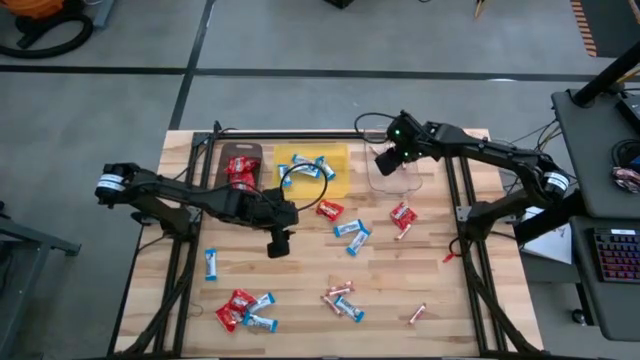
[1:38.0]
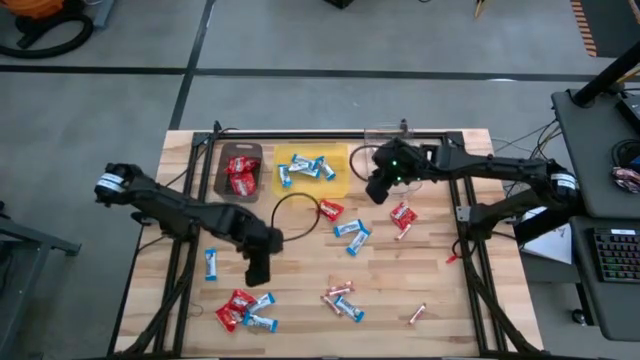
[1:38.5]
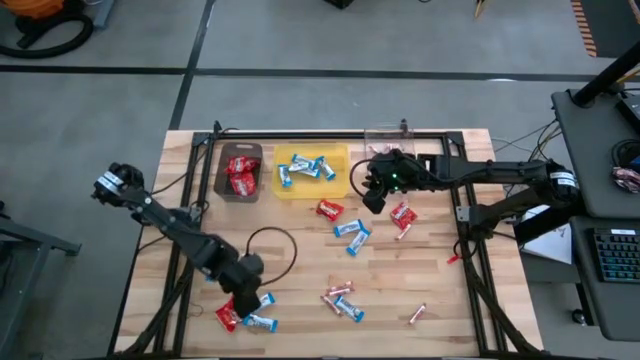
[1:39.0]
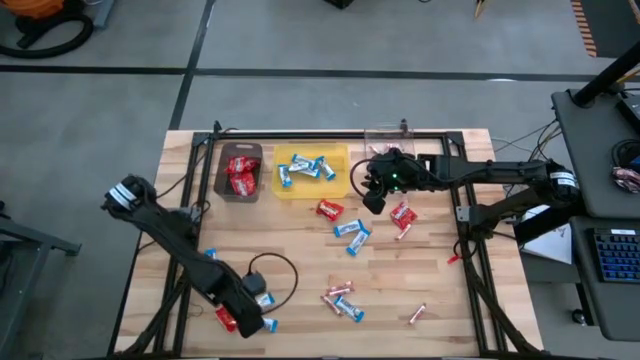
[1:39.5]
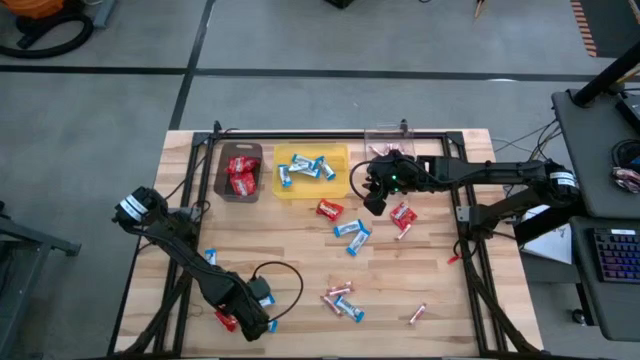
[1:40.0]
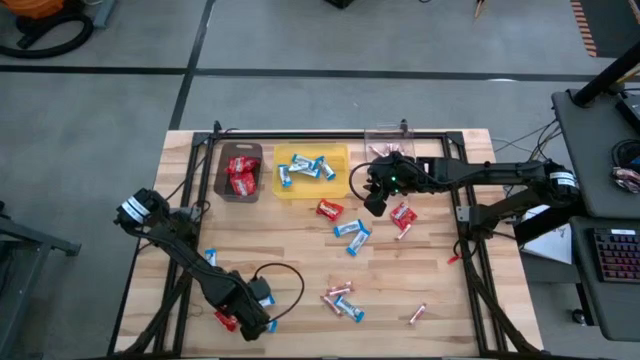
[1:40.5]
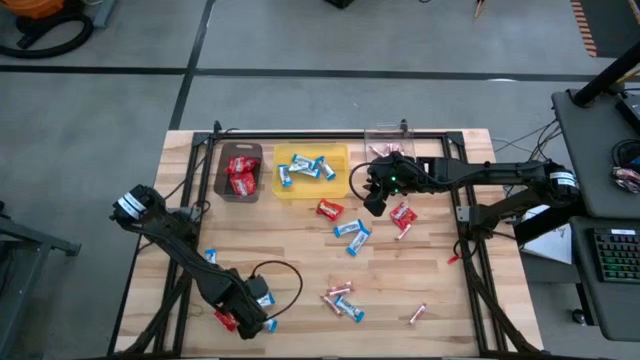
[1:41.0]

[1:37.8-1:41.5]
Task: Sort candy
Put the red candy into the black bin

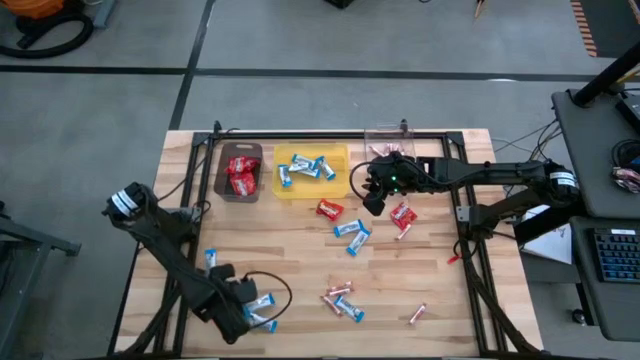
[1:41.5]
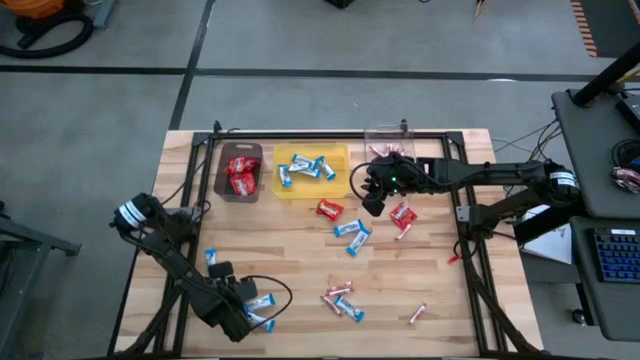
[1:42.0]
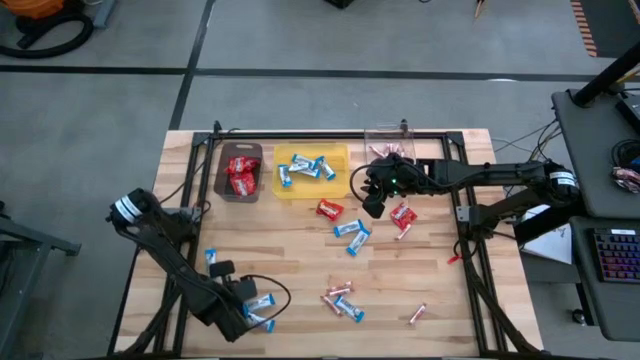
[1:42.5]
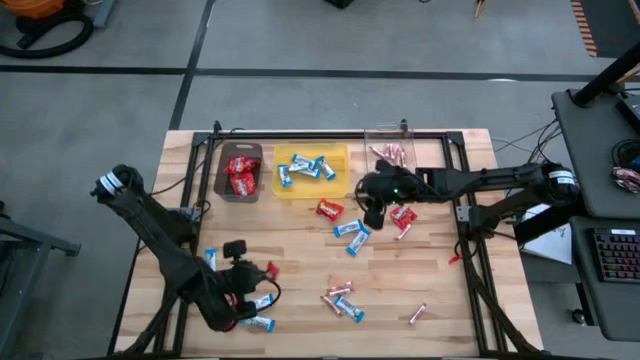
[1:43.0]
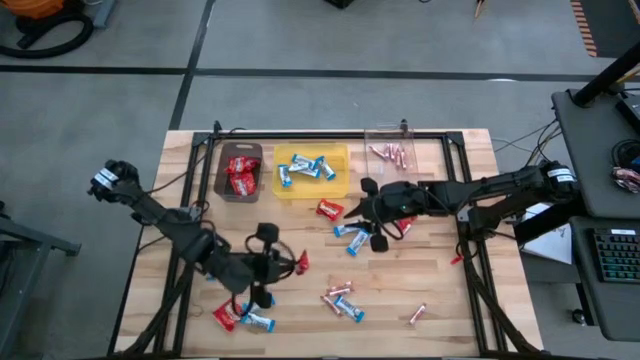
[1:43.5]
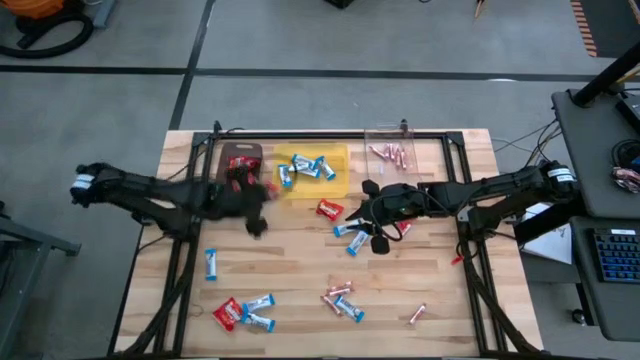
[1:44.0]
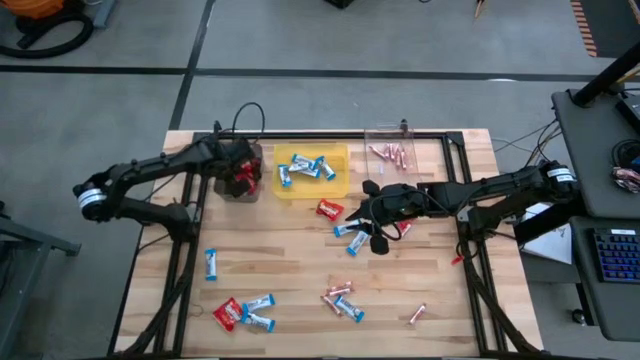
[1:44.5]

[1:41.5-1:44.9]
Put the red candy into the black bin

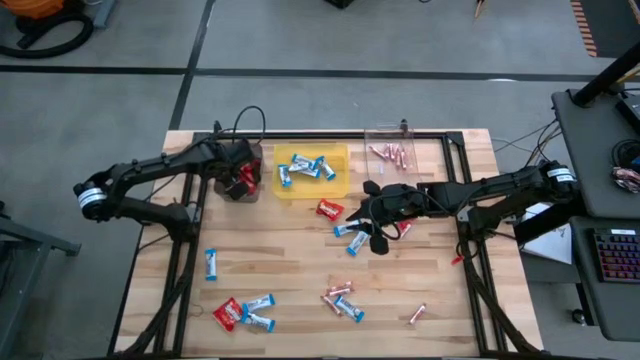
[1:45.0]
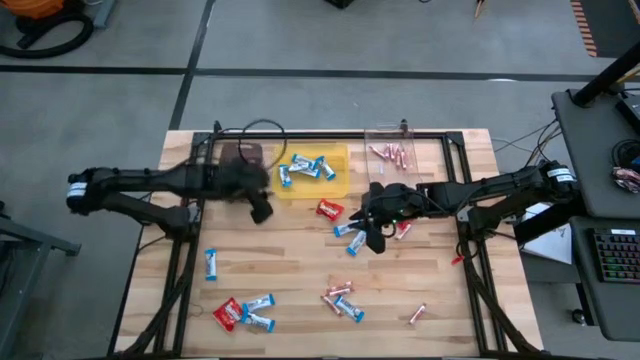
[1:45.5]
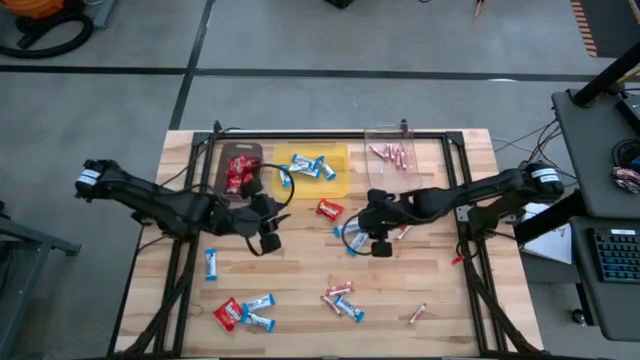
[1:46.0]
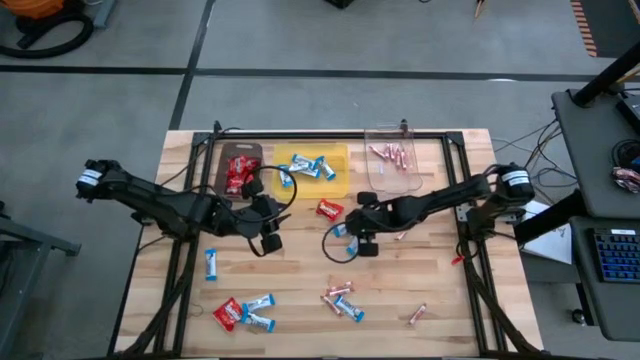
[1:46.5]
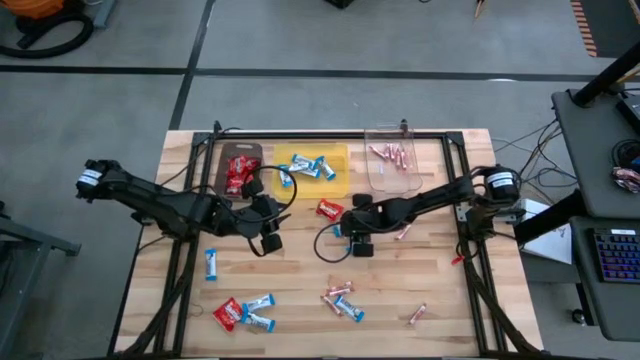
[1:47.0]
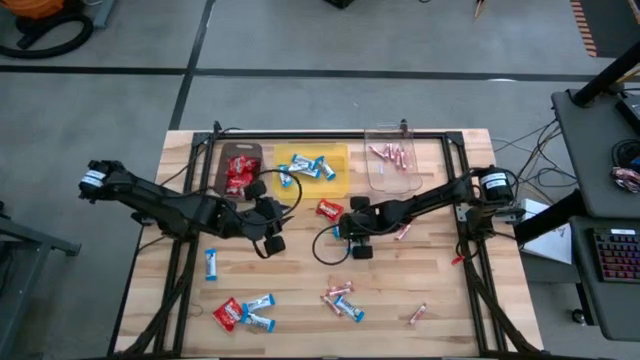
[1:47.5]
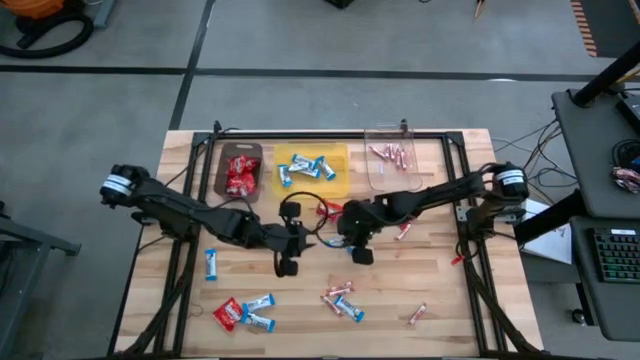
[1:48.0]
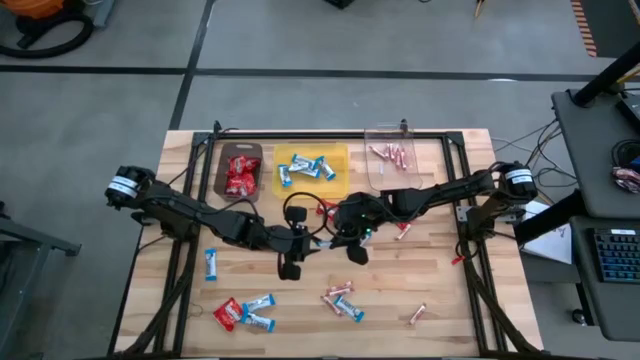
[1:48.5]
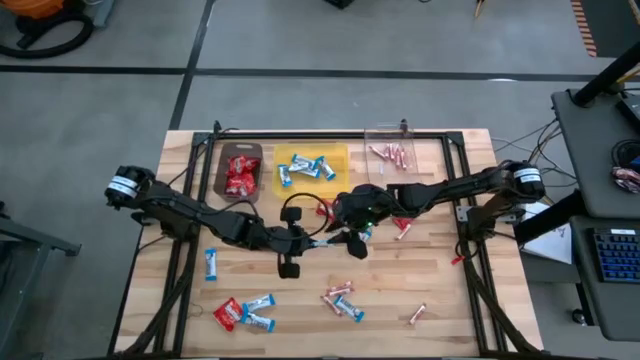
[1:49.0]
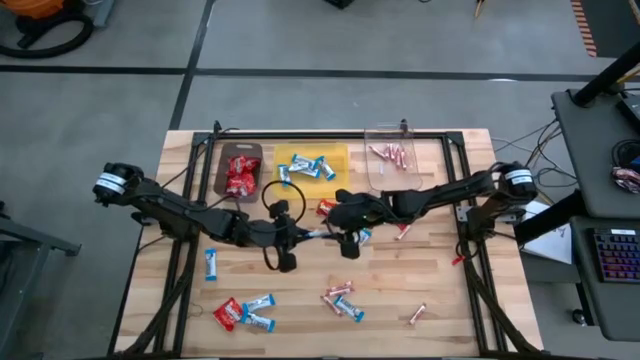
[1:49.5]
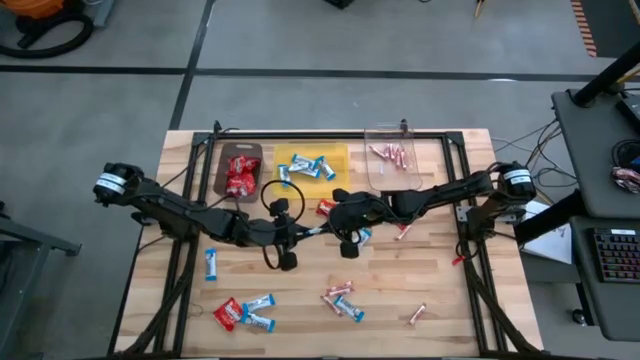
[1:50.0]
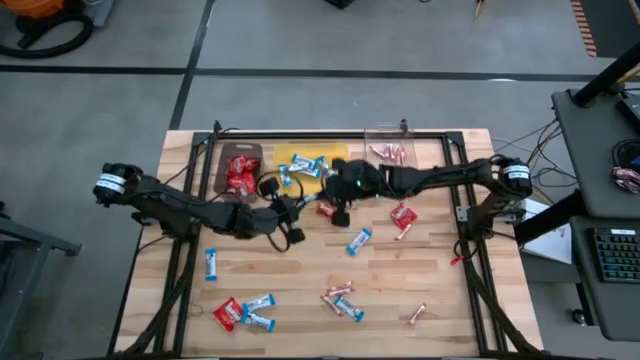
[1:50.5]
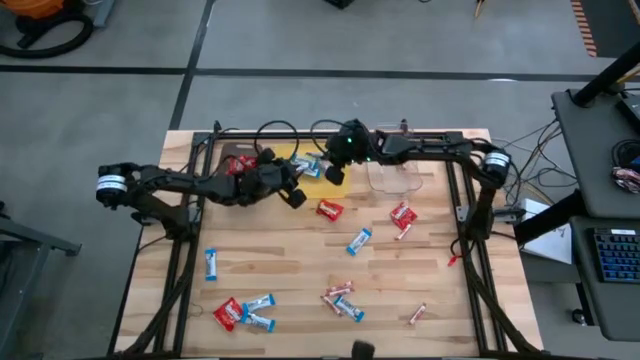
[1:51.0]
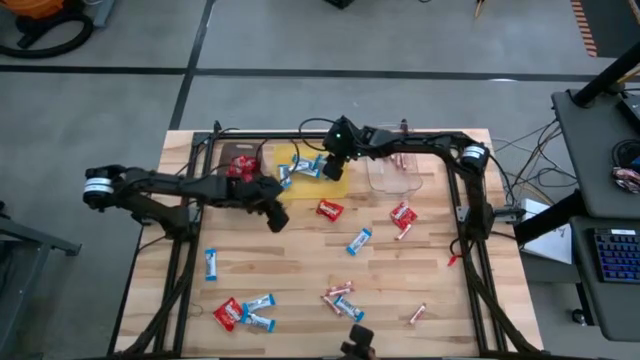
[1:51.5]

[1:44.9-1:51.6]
Put the white candy into the yellow bin

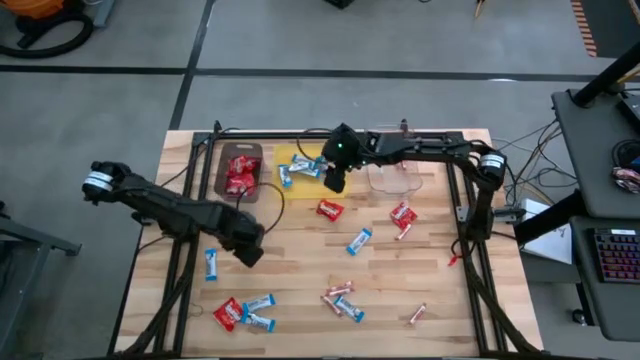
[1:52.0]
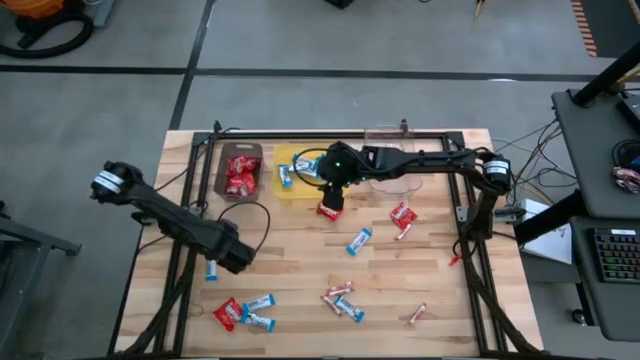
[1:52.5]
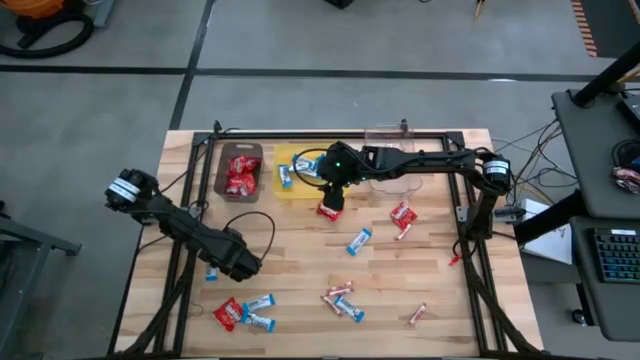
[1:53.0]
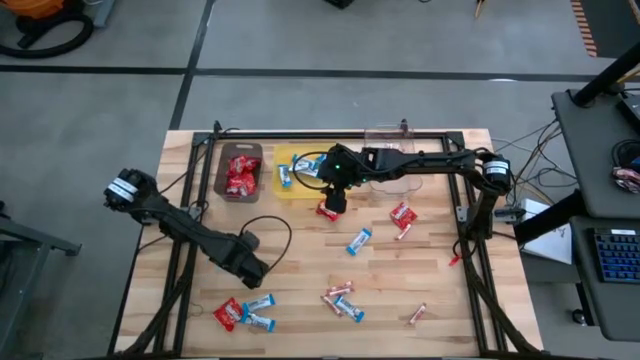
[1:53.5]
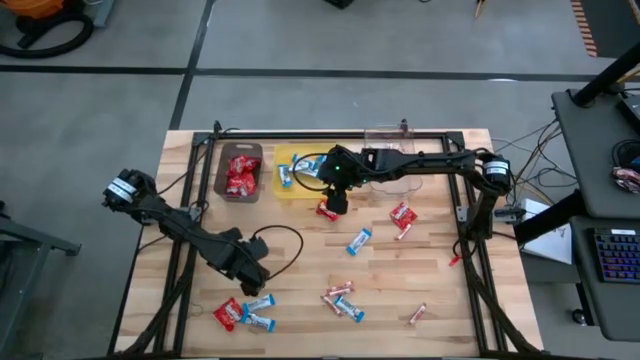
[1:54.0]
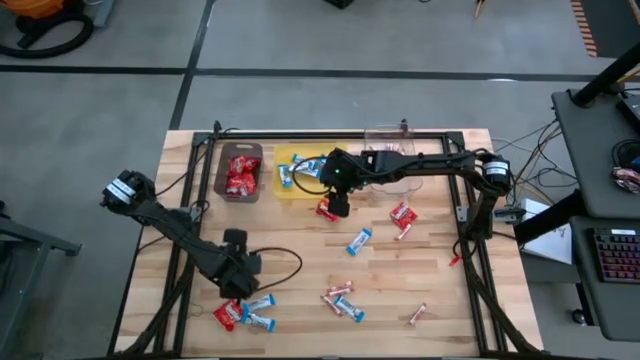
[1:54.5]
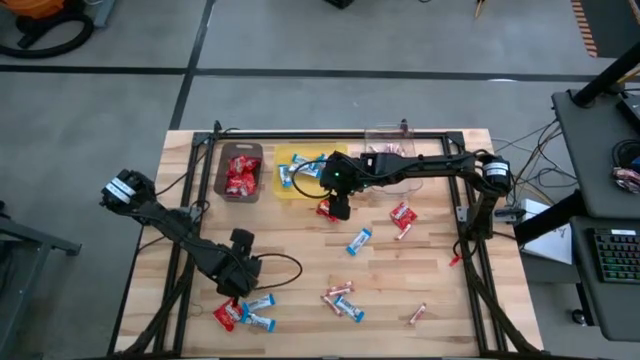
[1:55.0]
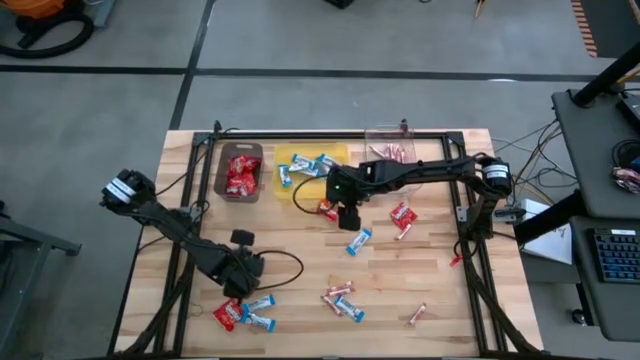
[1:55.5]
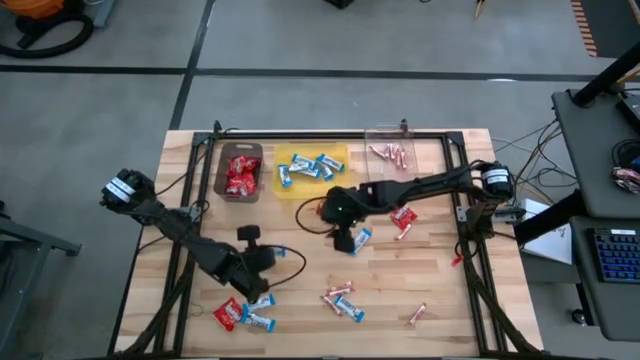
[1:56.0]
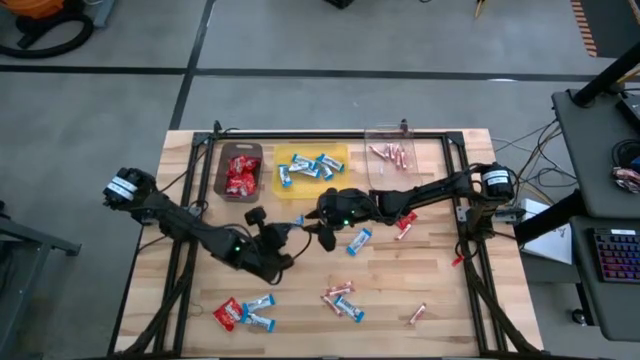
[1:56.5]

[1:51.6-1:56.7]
Put the white candy into the yellow bin

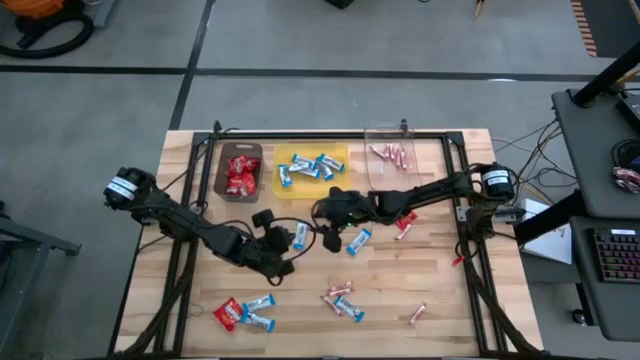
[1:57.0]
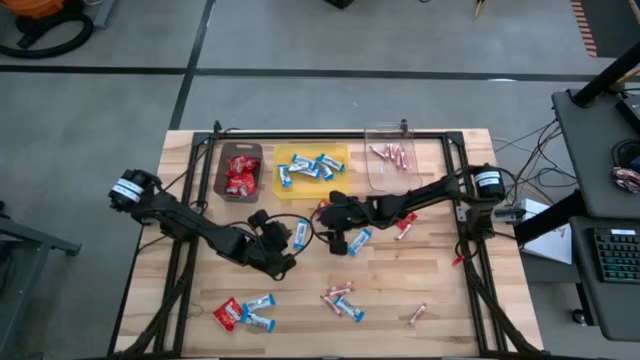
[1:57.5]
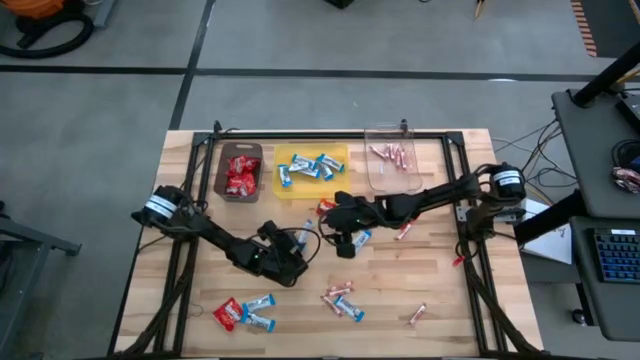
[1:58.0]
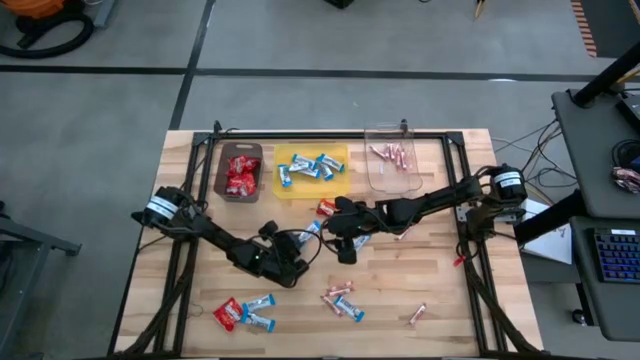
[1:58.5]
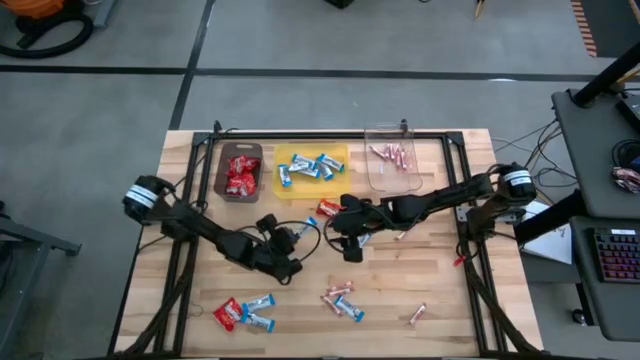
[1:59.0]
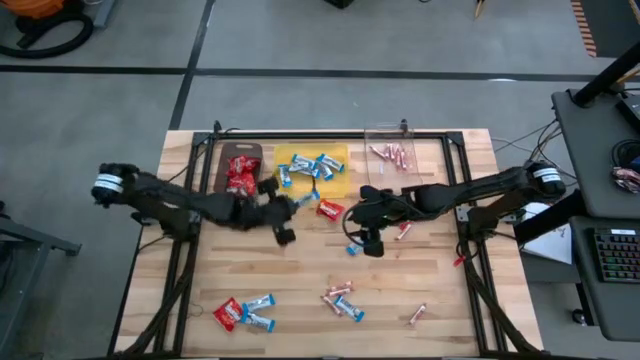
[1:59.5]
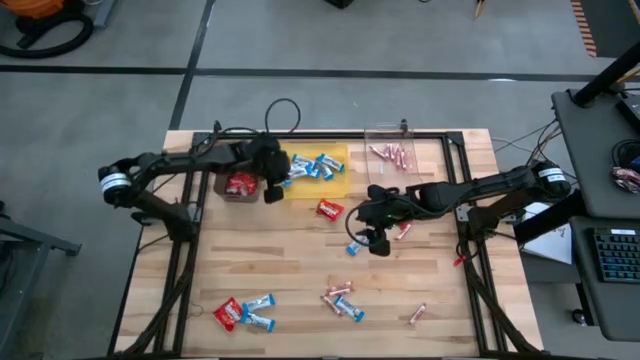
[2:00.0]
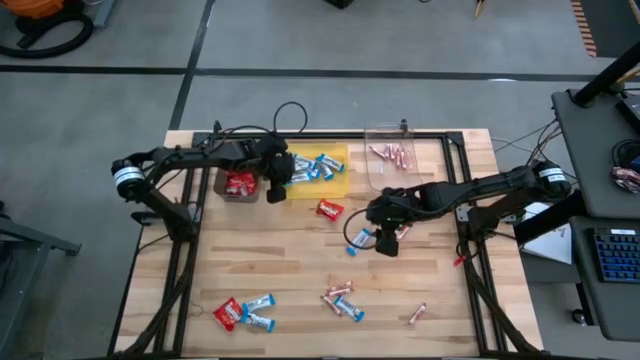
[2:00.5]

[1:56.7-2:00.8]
Put the white candy into the yellow bin
